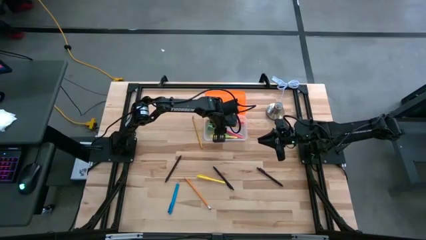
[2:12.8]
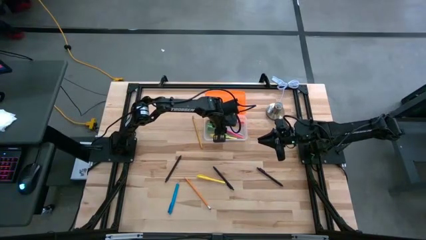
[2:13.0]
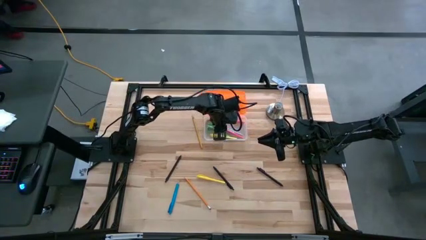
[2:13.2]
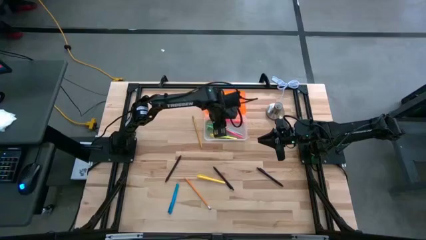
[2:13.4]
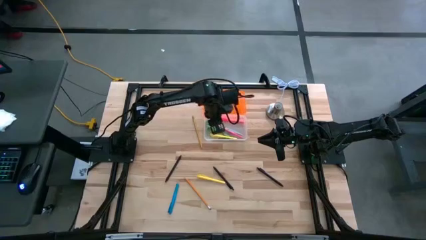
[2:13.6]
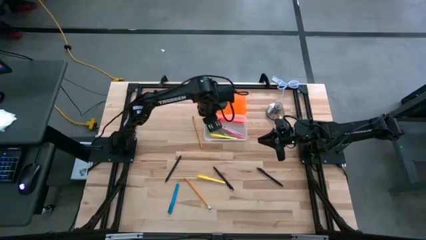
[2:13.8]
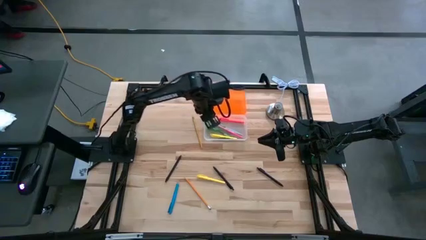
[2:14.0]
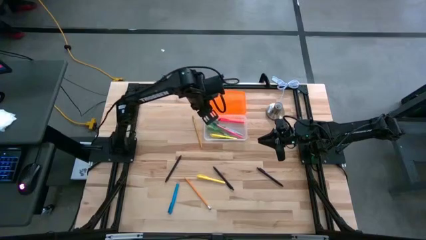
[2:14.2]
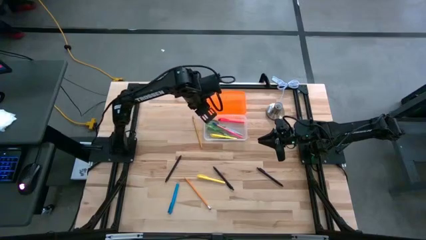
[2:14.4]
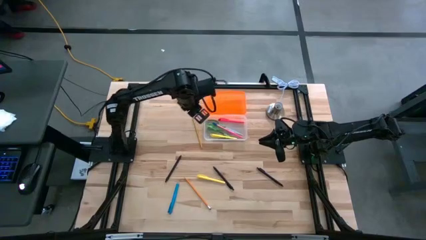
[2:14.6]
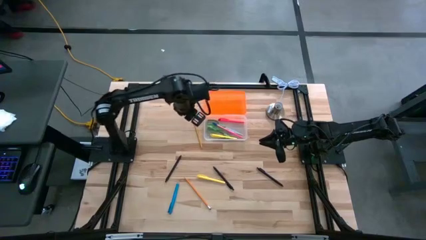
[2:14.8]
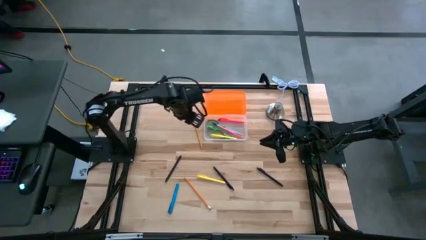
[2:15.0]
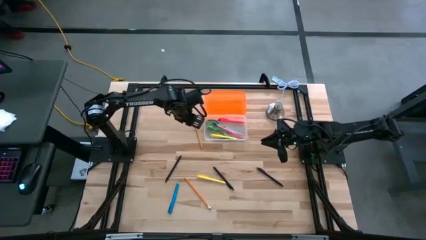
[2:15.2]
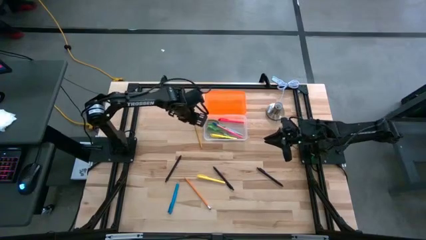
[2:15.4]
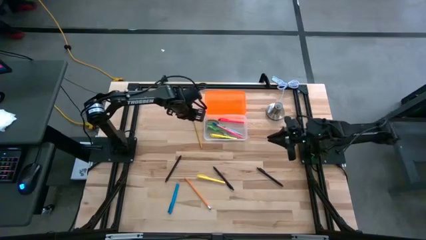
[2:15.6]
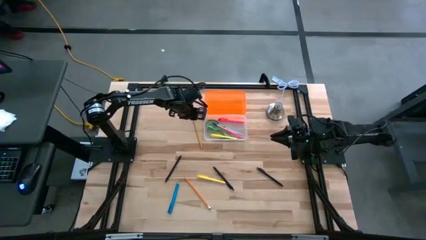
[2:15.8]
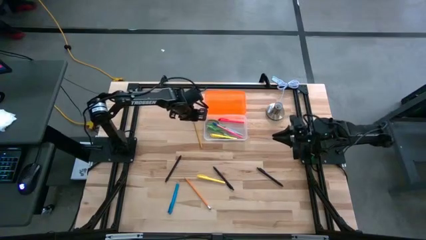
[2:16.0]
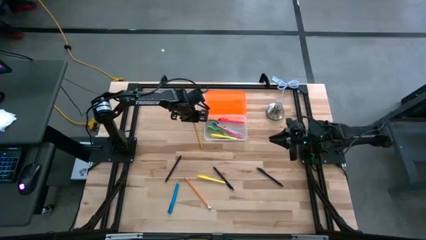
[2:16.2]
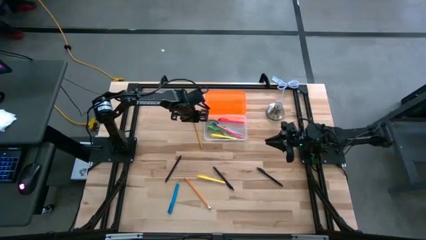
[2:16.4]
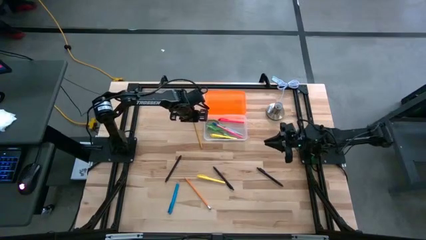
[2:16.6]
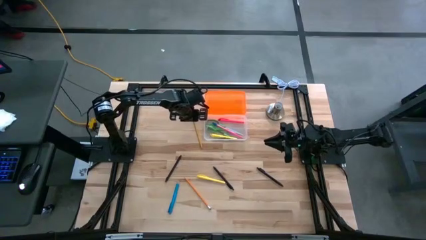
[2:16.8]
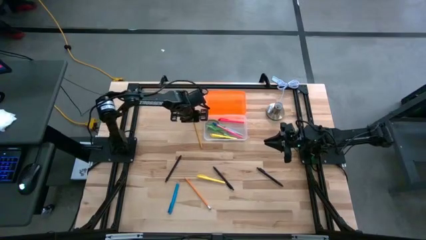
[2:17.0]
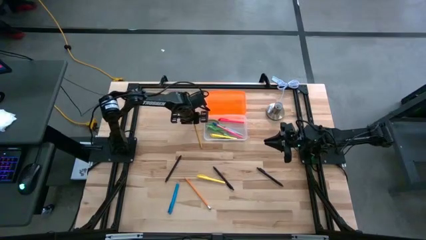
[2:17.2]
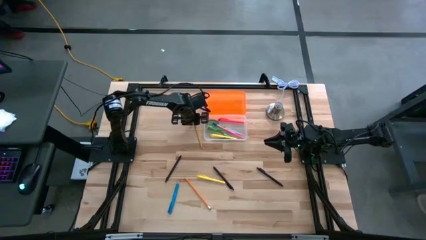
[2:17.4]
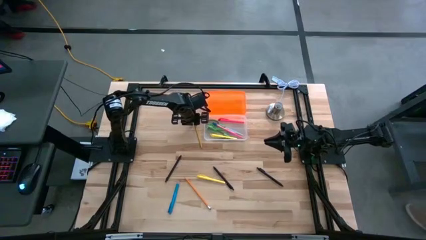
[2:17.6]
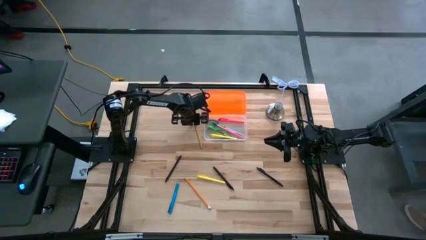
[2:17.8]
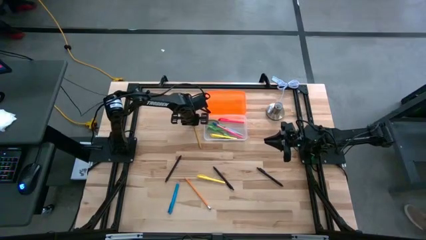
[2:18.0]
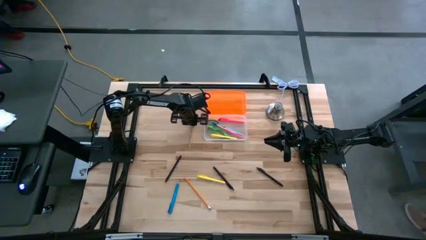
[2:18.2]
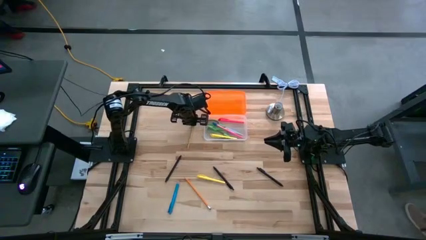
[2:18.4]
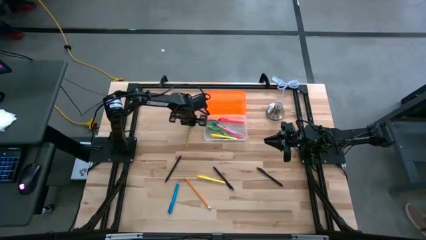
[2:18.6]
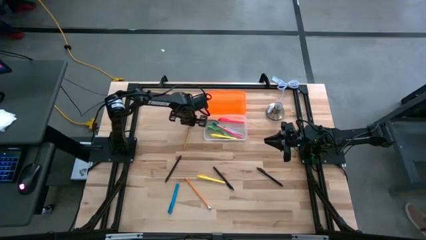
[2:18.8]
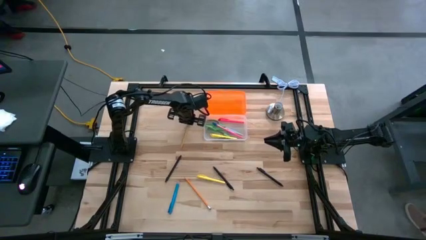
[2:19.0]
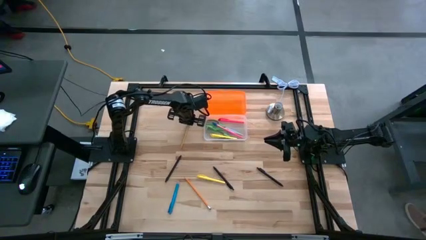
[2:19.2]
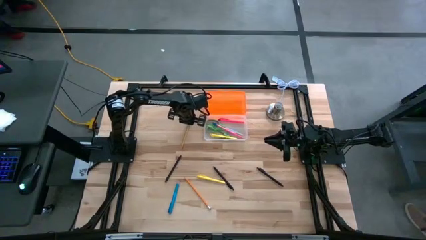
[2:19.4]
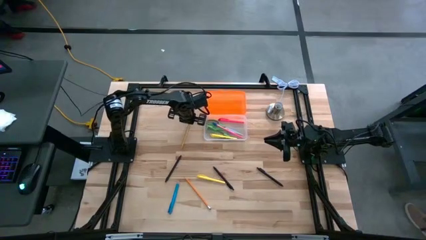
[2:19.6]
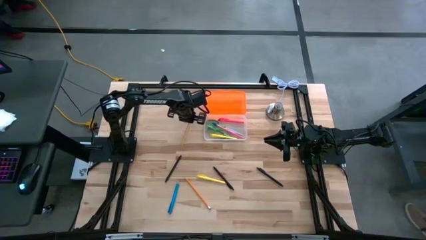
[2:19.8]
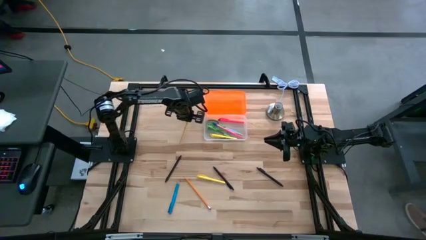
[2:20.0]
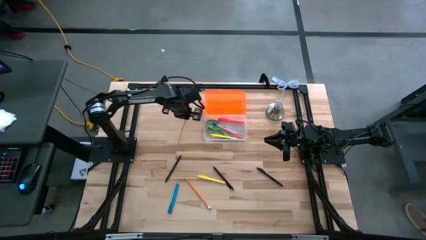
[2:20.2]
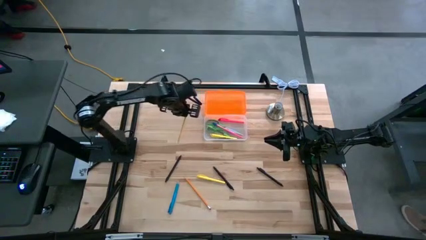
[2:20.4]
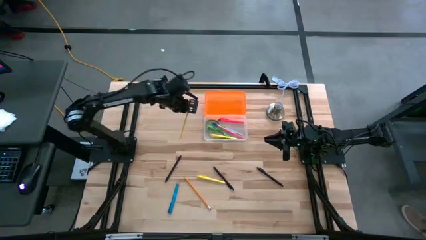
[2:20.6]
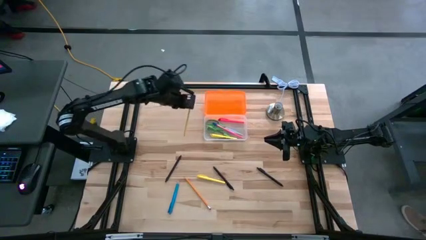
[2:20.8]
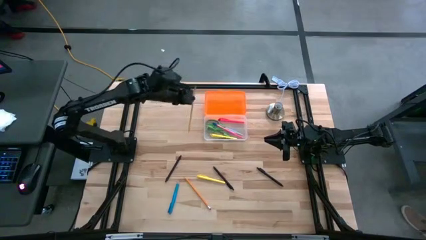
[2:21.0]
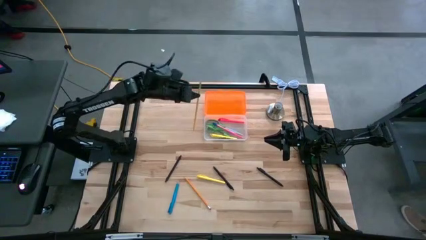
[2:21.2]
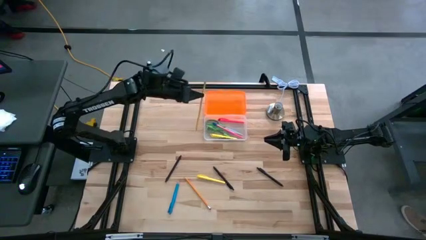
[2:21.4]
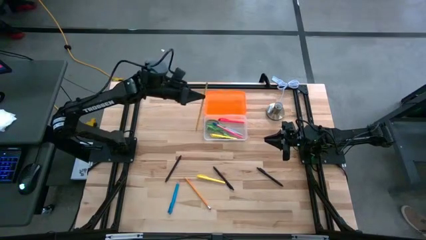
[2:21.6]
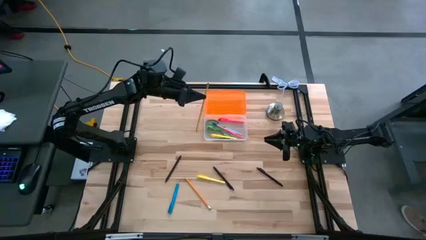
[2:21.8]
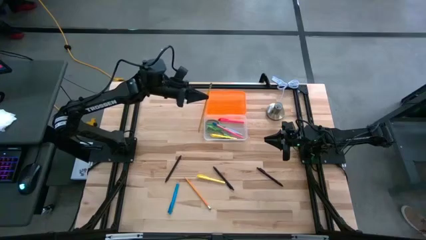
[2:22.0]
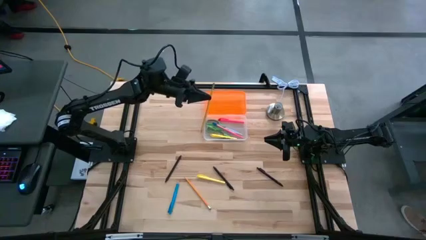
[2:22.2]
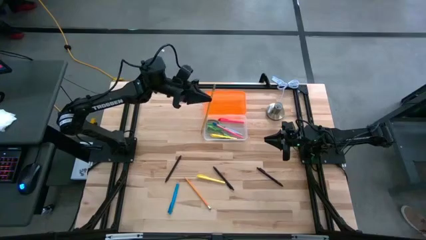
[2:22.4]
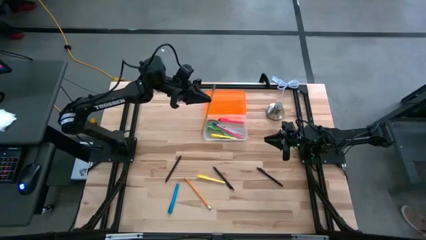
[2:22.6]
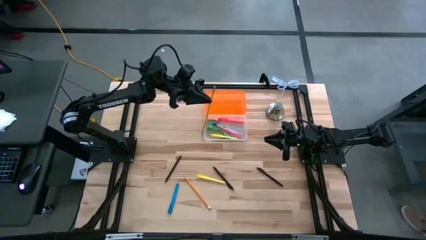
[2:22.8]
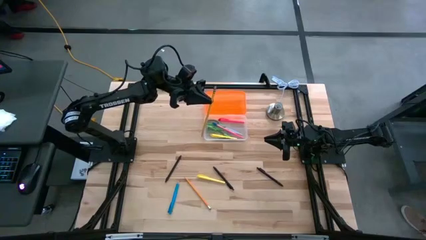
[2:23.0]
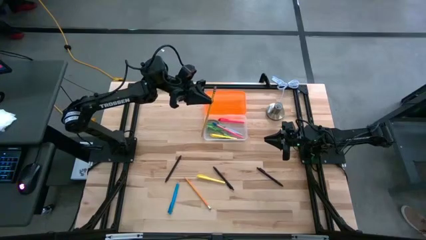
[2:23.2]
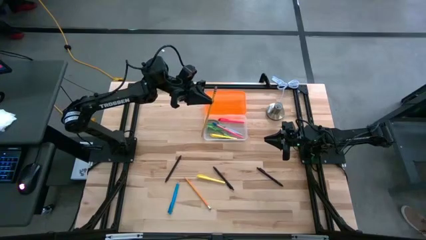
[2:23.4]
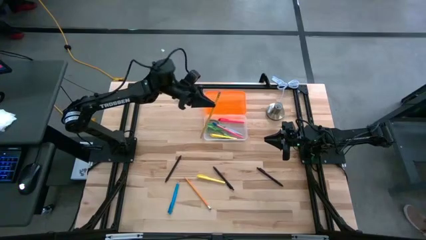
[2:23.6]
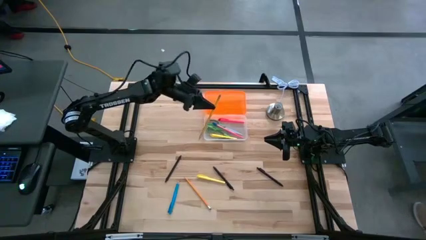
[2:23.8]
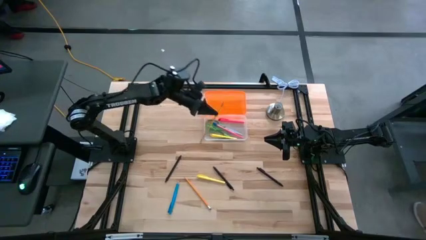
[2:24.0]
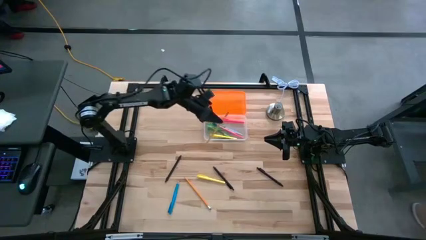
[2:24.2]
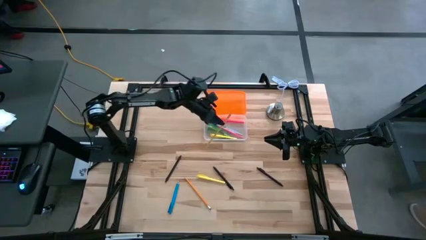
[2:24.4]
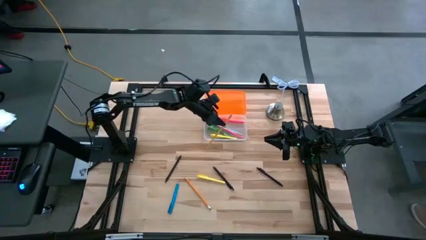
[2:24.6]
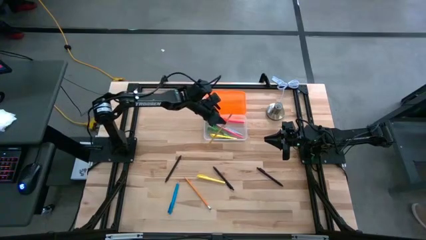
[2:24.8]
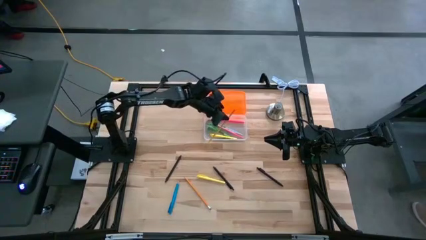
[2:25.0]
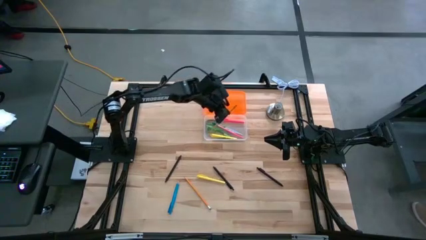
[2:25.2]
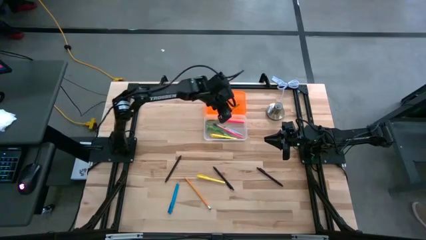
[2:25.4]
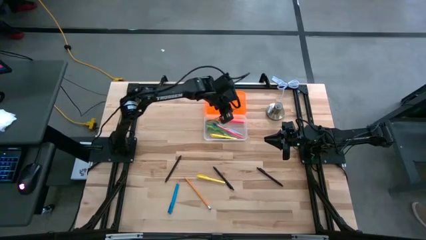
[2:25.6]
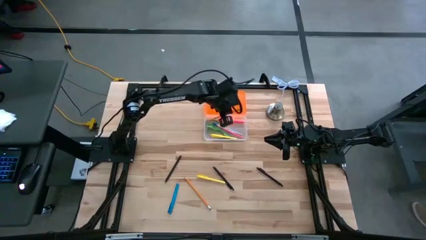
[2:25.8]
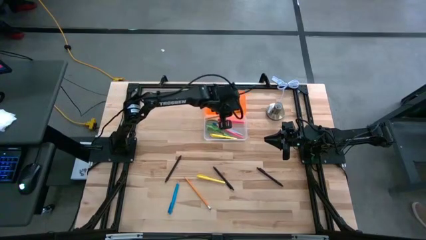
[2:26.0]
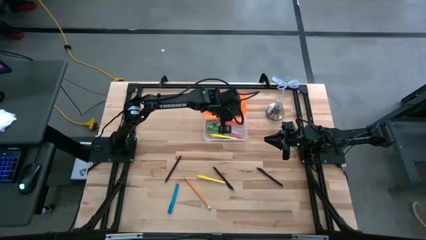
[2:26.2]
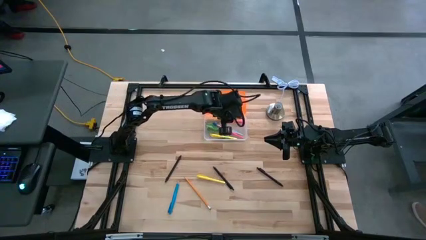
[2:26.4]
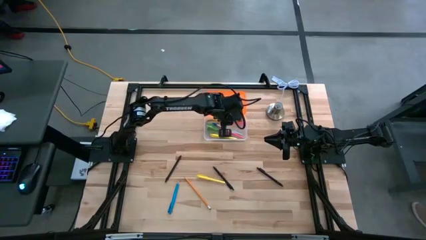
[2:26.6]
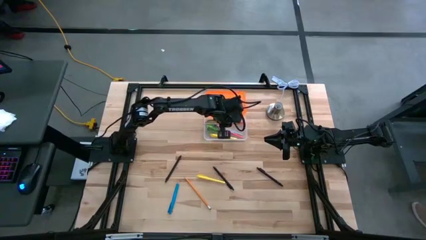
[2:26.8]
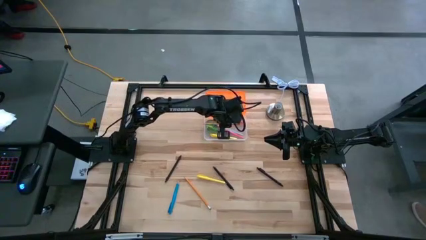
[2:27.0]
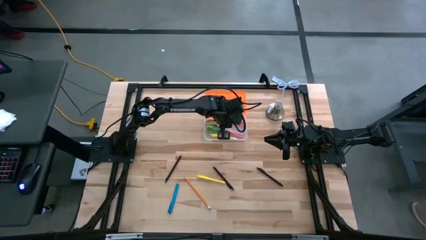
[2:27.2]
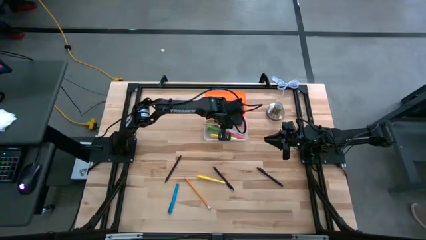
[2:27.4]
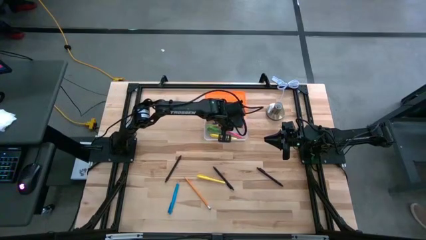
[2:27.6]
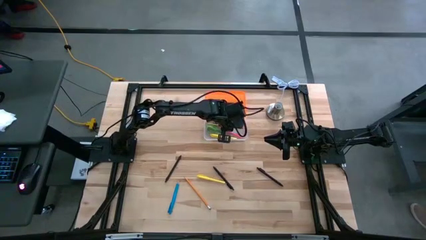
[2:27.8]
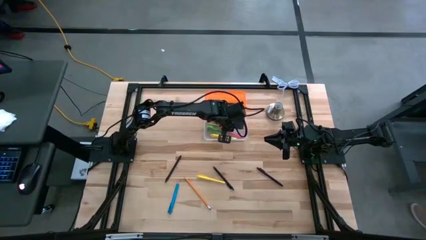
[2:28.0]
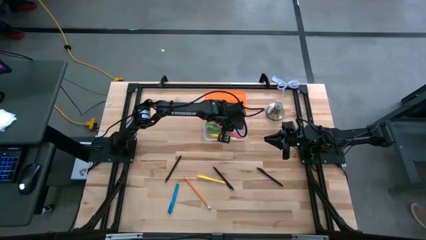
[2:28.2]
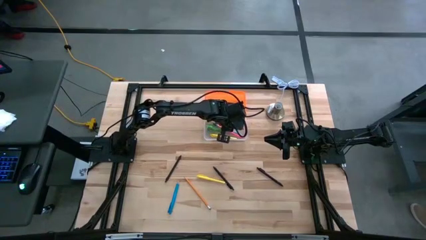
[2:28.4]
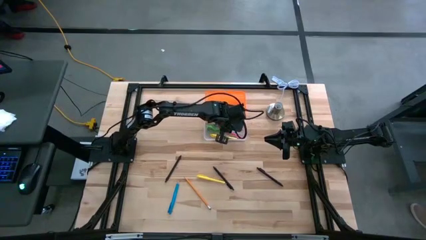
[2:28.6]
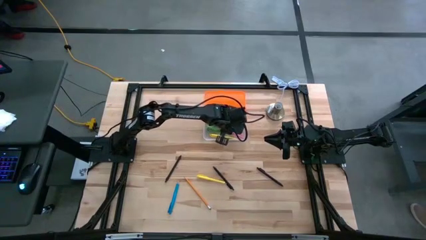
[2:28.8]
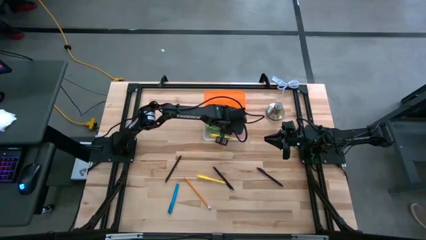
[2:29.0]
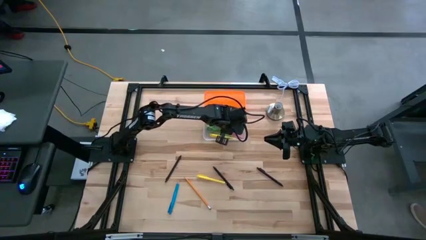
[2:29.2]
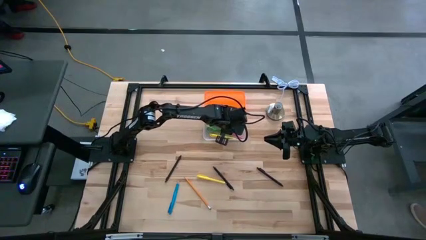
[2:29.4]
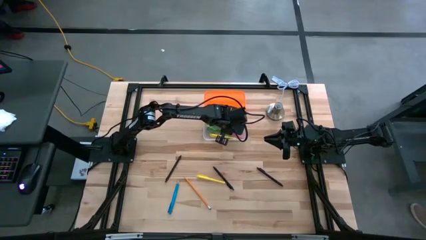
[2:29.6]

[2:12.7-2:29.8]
Task: Pick & place school supplies into a supply box
Put the yellow pencil into the supply box
